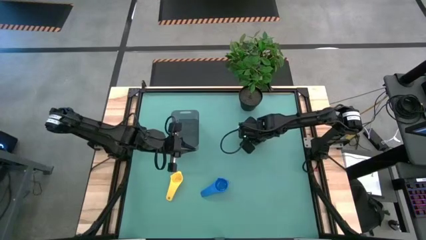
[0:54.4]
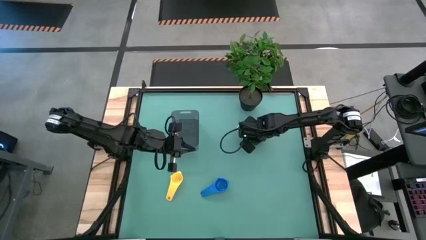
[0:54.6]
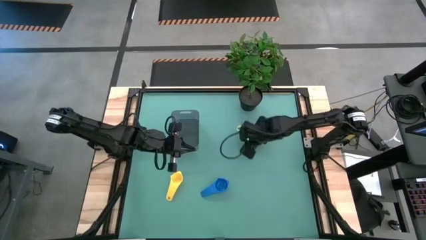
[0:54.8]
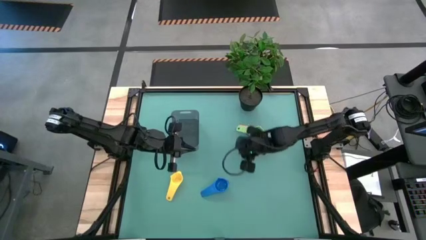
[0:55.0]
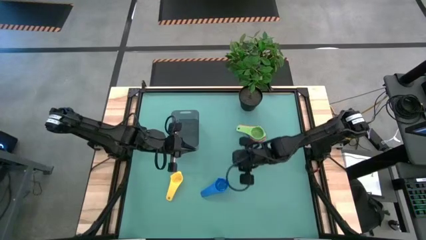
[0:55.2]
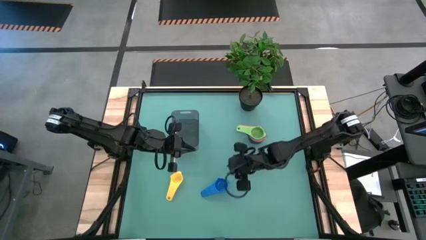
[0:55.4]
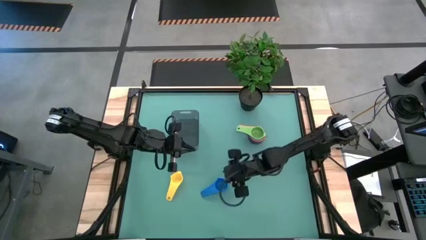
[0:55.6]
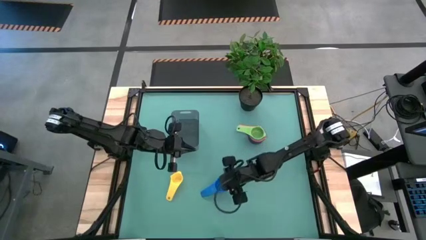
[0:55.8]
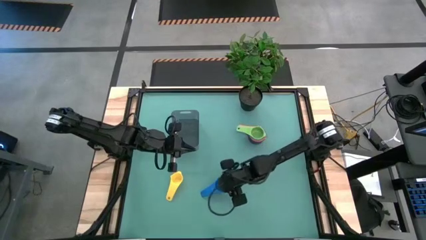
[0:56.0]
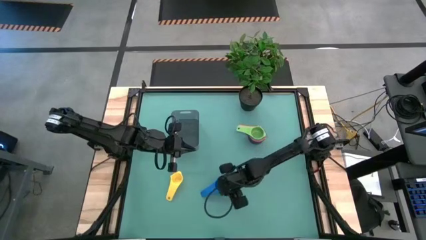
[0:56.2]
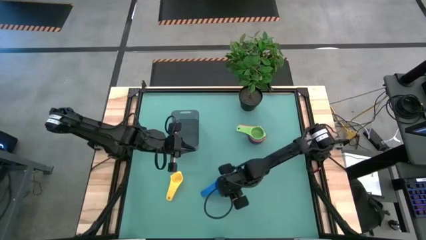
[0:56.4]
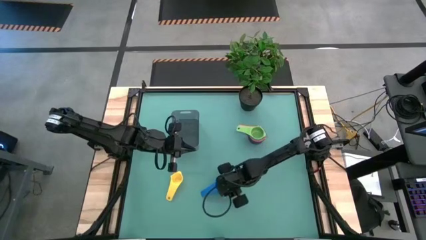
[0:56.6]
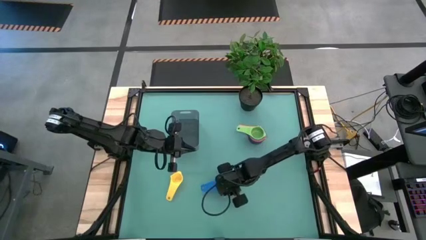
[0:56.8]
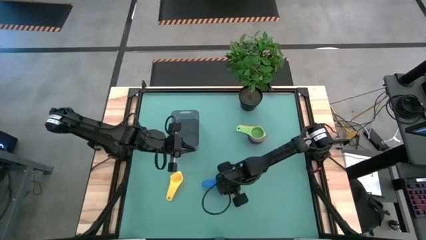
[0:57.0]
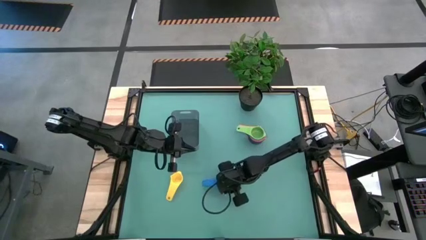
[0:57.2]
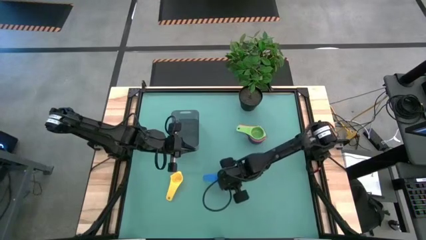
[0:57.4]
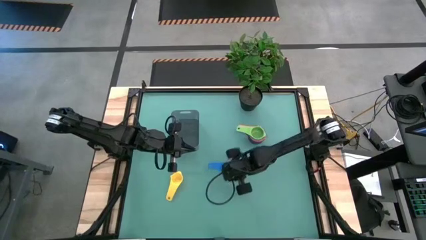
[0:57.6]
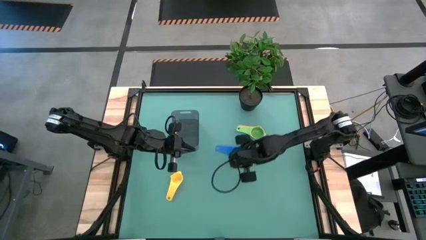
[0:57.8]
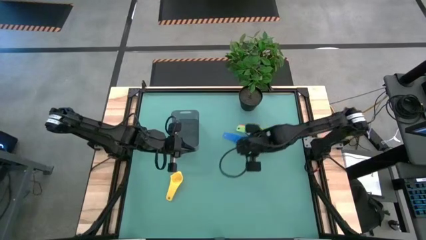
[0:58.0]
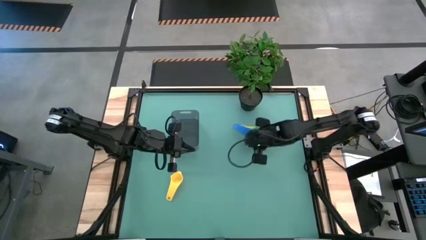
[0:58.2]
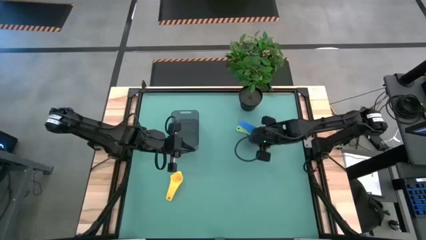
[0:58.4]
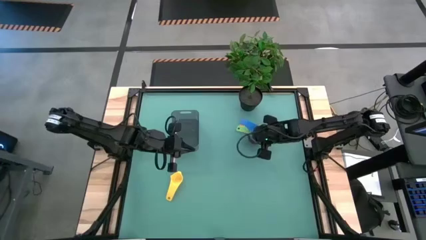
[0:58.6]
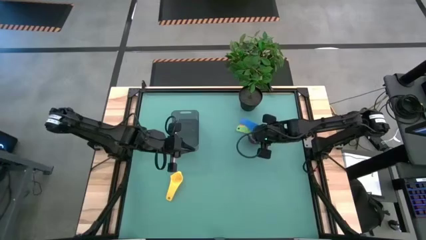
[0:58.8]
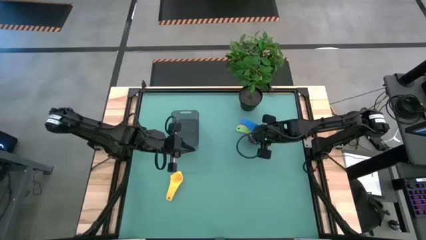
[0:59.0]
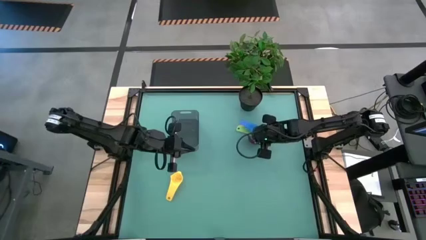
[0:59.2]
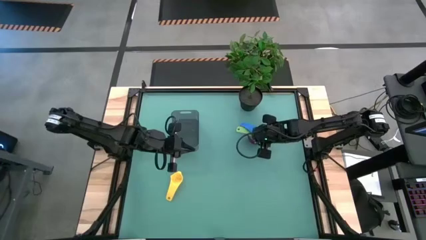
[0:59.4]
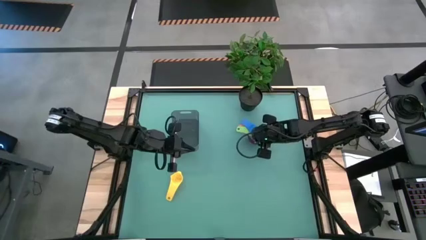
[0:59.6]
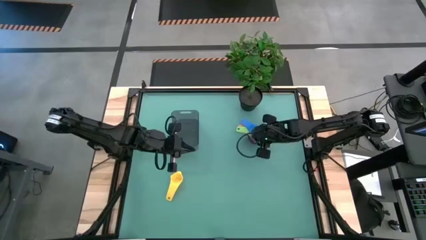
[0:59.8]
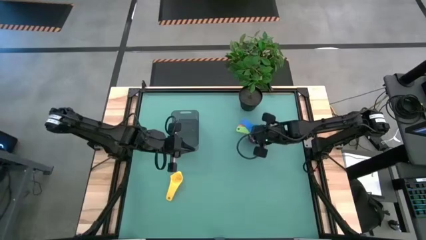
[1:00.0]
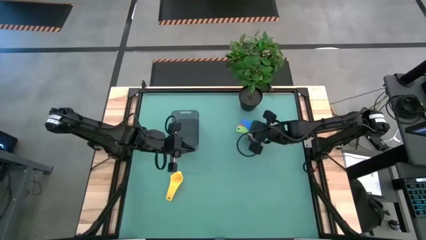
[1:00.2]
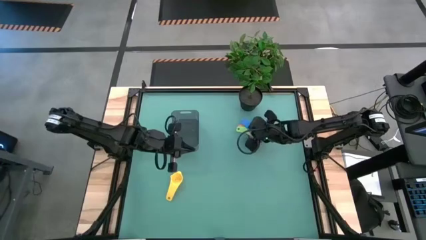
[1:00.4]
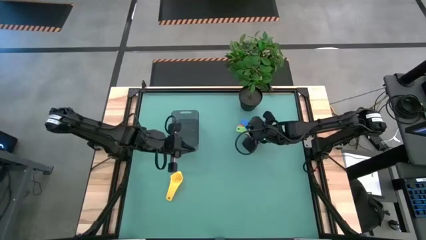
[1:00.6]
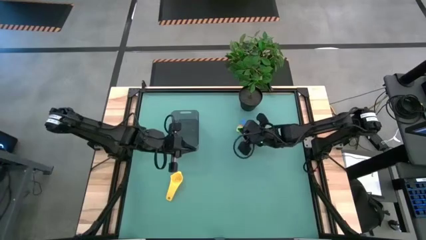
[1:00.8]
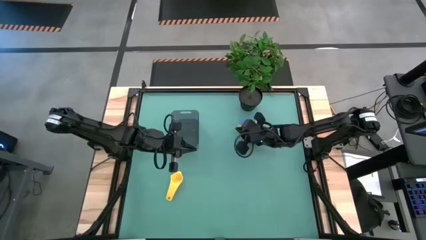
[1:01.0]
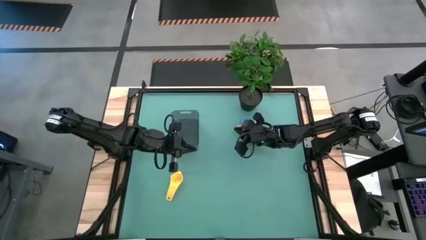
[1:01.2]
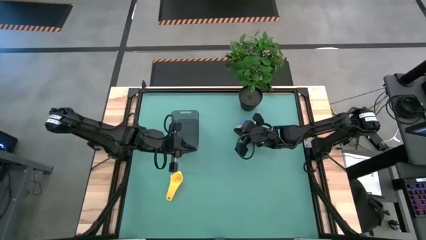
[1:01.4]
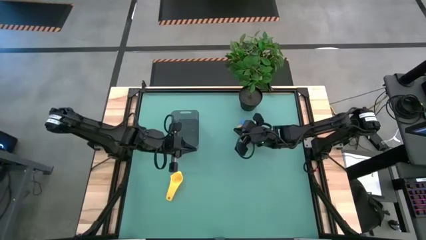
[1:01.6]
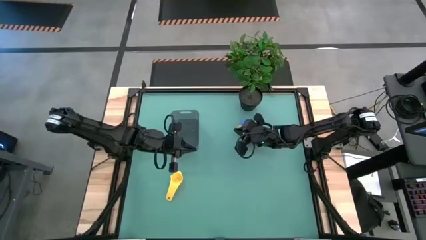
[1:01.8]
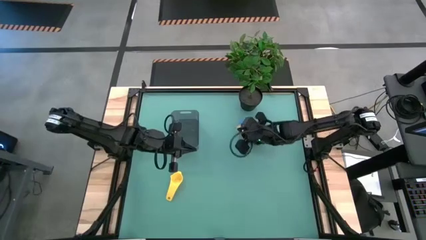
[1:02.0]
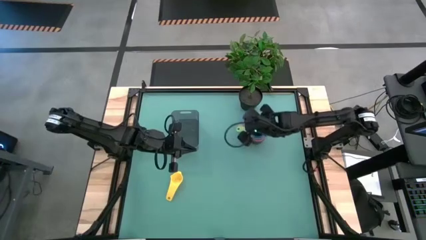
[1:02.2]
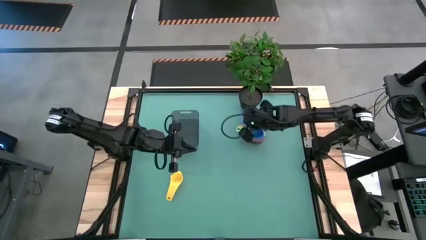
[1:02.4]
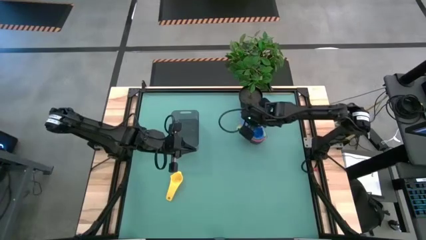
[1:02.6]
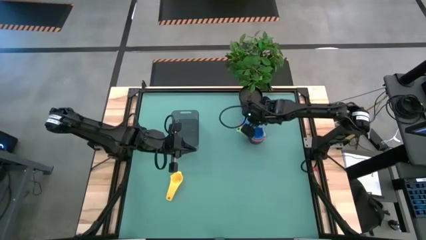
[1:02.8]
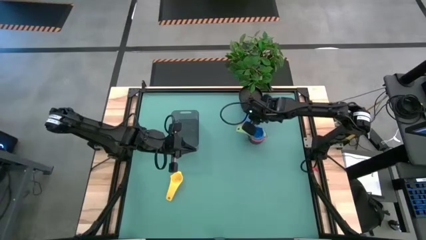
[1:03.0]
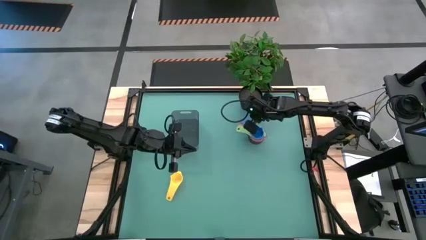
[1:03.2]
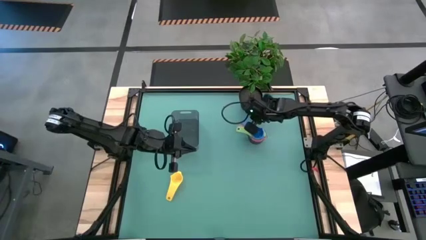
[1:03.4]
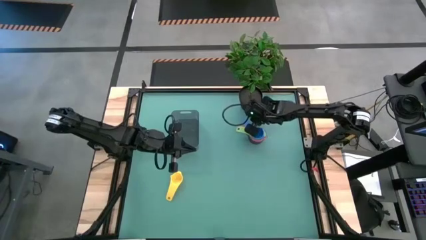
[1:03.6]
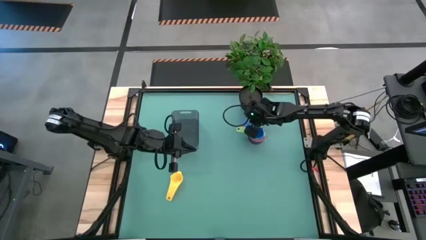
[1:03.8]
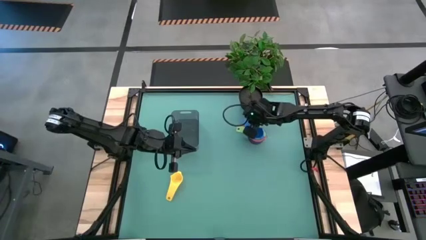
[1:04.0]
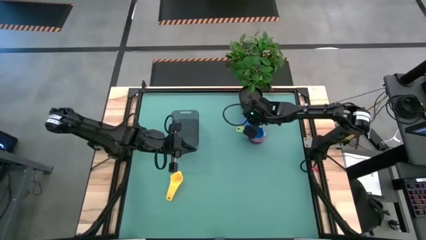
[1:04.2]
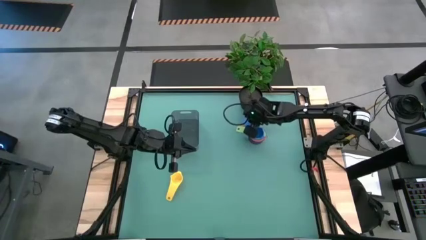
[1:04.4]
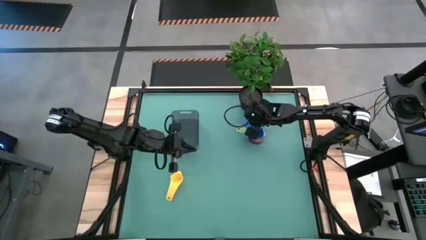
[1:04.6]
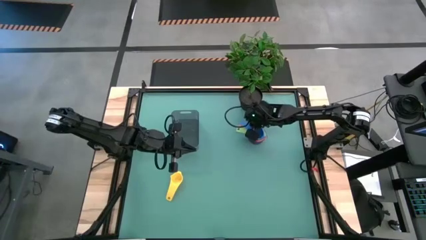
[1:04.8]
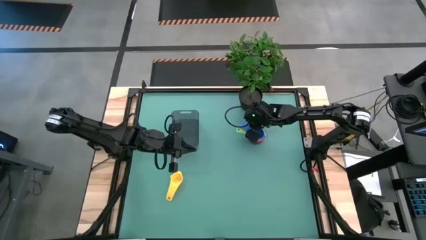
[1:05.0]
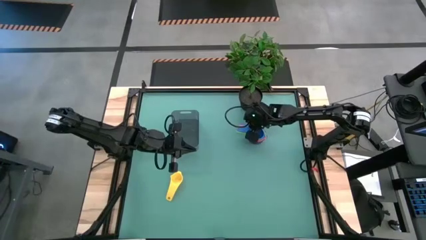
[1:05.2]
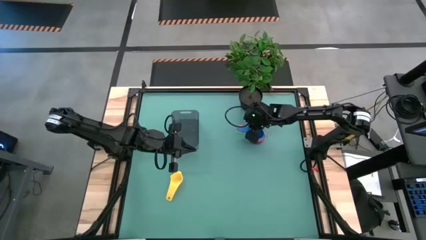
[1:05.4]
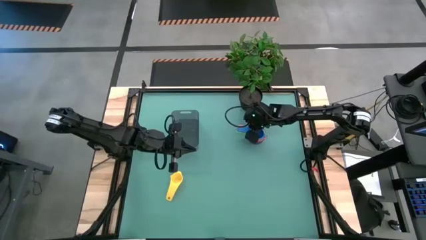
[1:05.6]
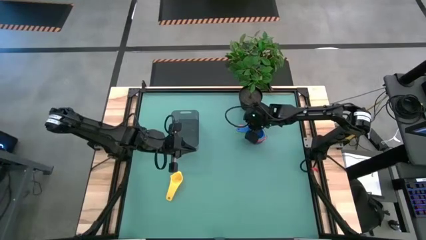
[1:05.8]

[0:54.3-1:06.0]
Task: Nest measuring cups in basket
Stack the blue measuring cup on top of the light green measuring cup
